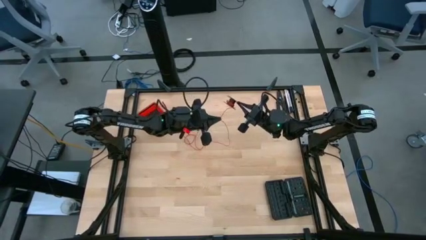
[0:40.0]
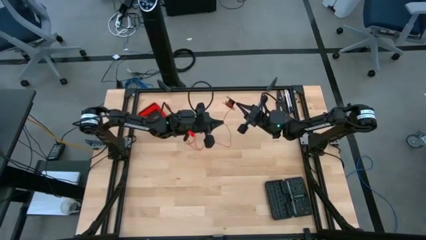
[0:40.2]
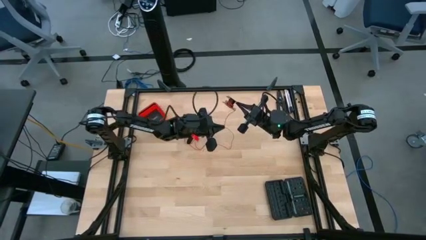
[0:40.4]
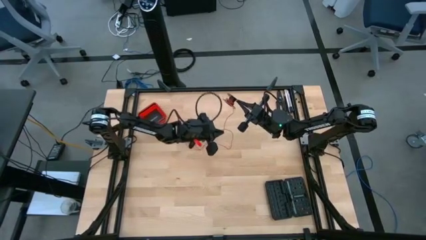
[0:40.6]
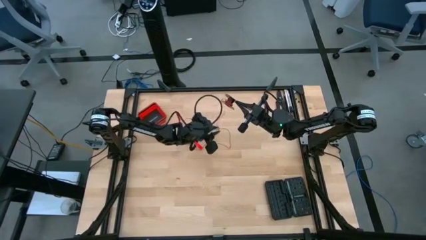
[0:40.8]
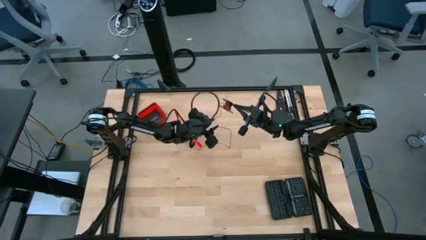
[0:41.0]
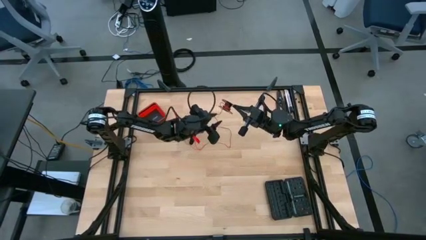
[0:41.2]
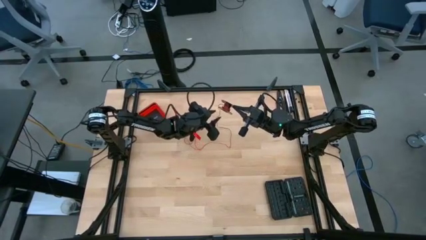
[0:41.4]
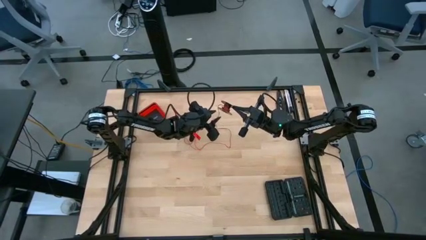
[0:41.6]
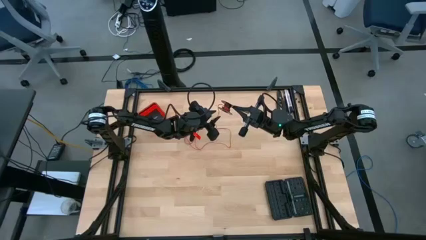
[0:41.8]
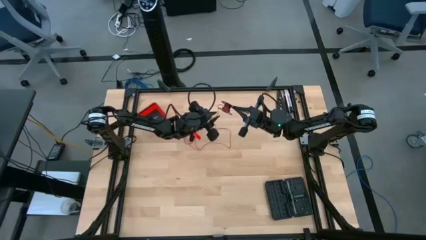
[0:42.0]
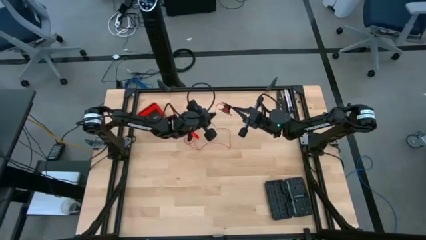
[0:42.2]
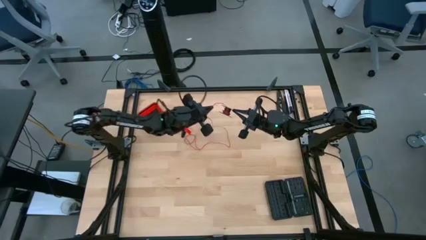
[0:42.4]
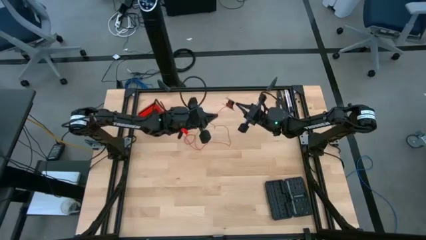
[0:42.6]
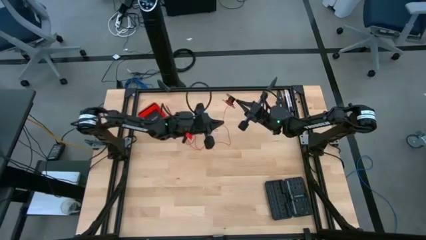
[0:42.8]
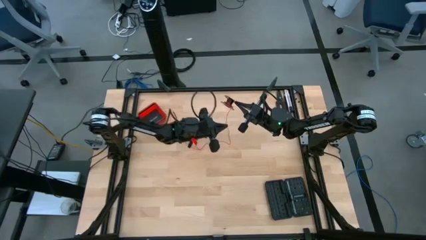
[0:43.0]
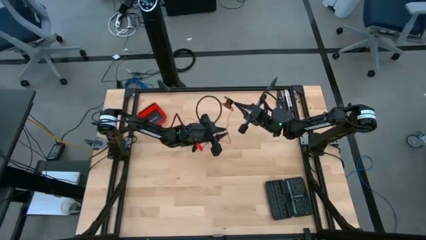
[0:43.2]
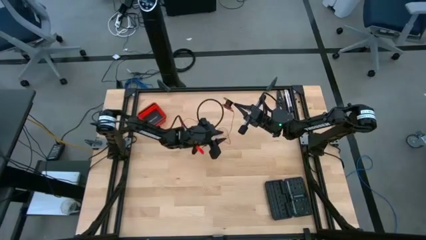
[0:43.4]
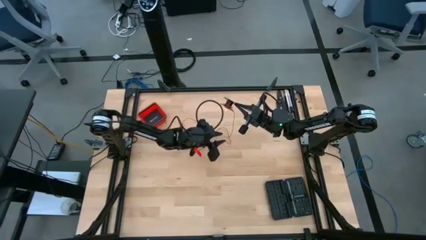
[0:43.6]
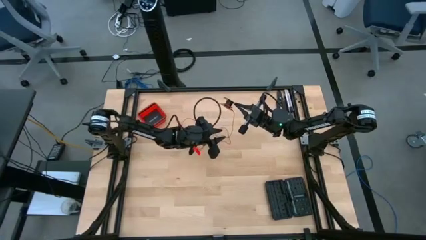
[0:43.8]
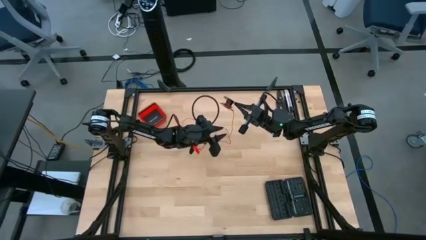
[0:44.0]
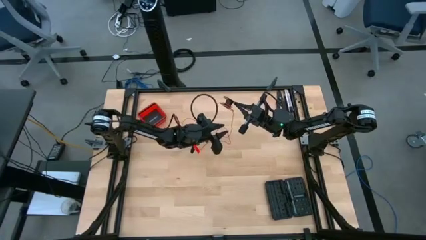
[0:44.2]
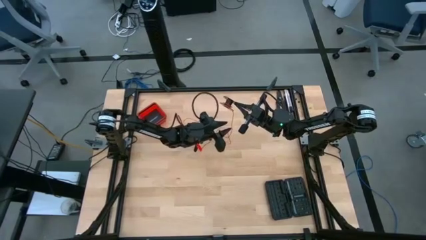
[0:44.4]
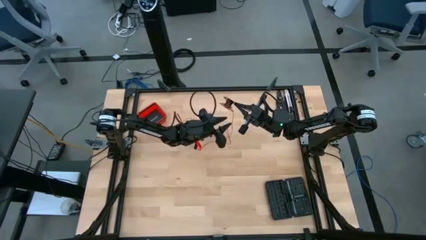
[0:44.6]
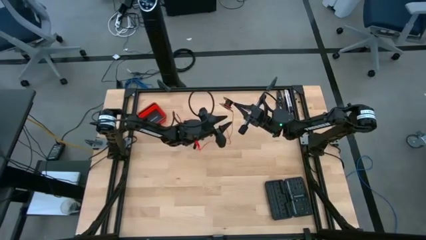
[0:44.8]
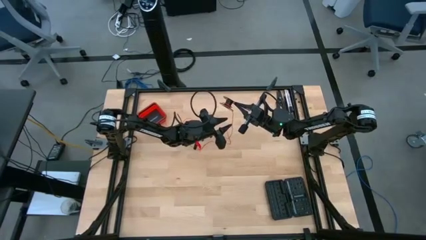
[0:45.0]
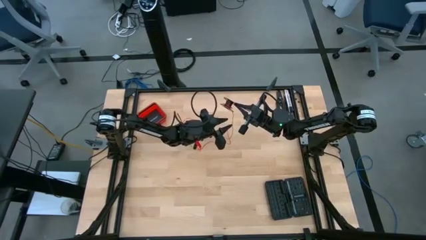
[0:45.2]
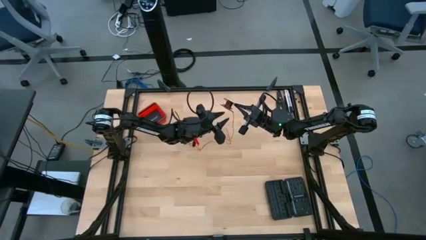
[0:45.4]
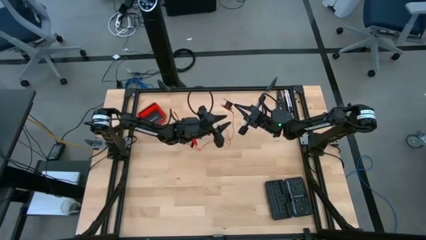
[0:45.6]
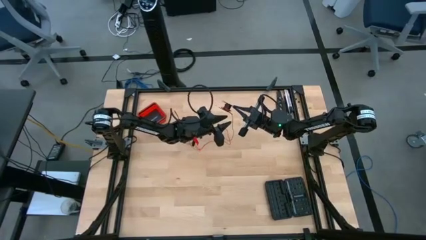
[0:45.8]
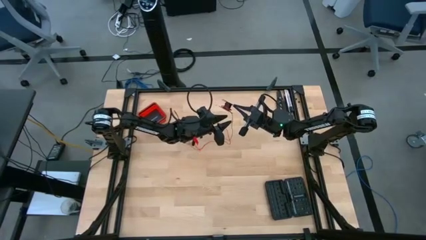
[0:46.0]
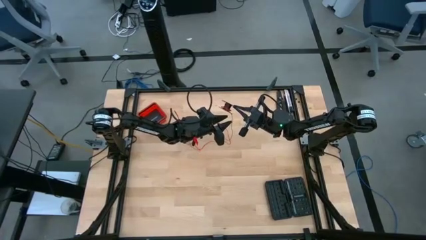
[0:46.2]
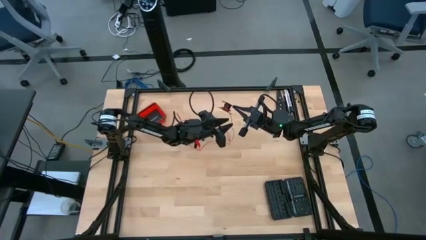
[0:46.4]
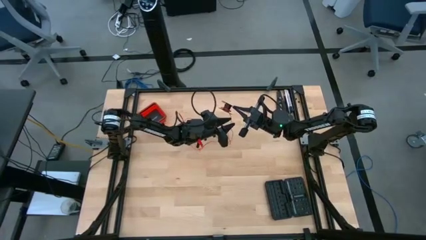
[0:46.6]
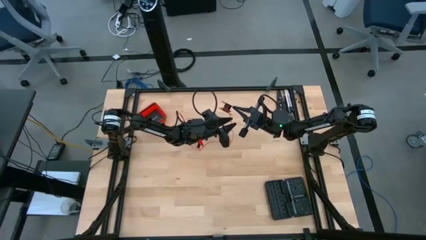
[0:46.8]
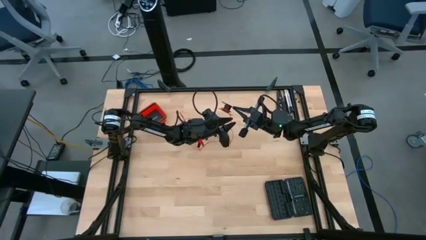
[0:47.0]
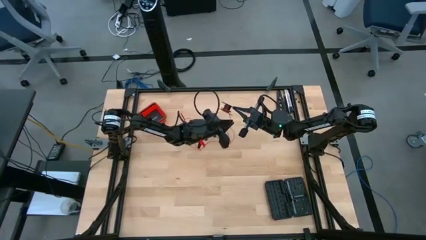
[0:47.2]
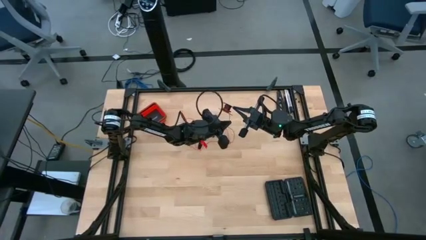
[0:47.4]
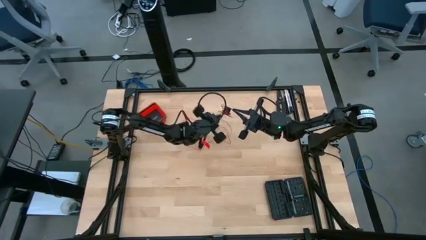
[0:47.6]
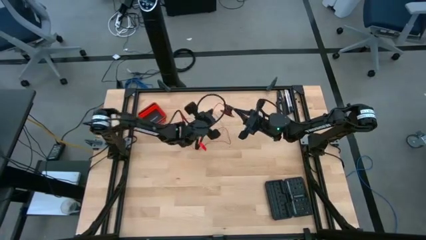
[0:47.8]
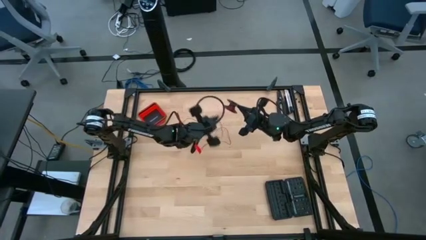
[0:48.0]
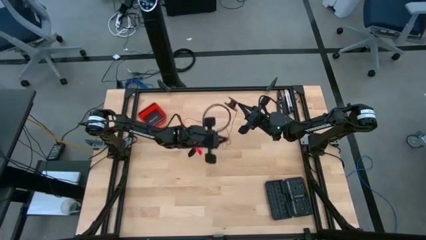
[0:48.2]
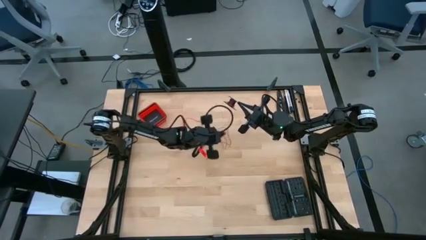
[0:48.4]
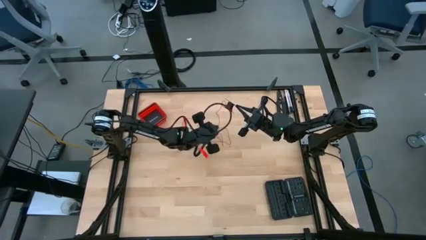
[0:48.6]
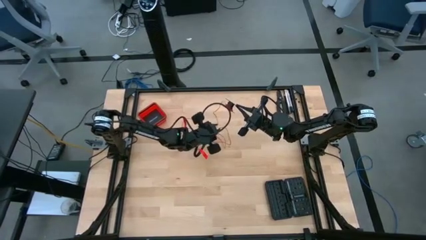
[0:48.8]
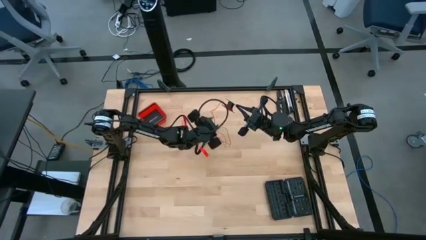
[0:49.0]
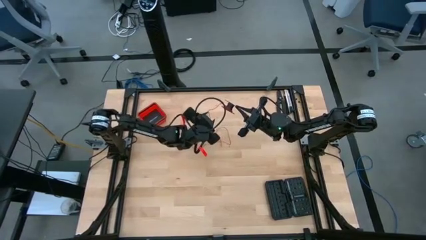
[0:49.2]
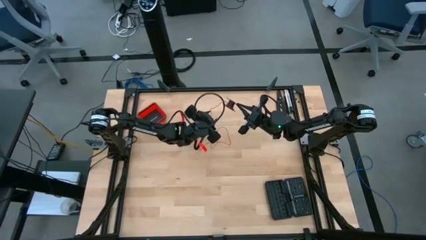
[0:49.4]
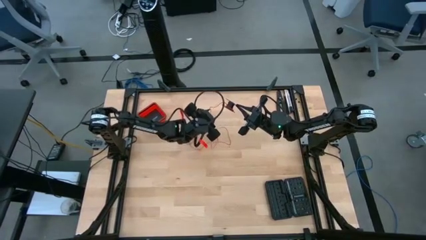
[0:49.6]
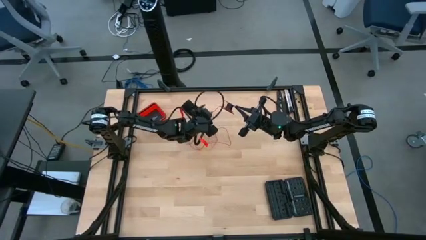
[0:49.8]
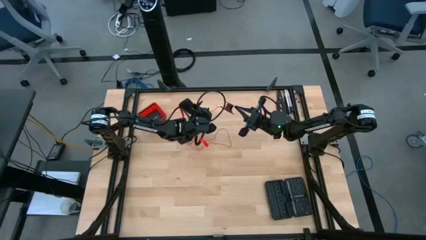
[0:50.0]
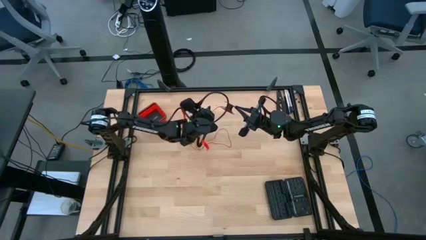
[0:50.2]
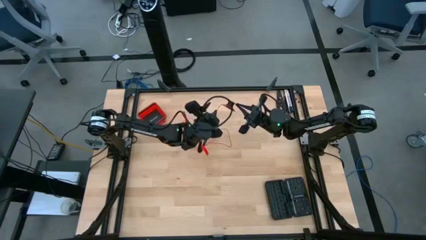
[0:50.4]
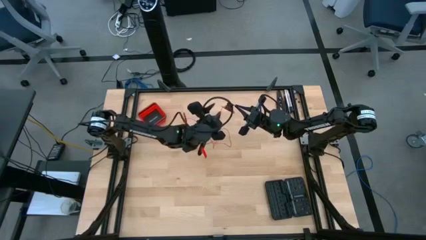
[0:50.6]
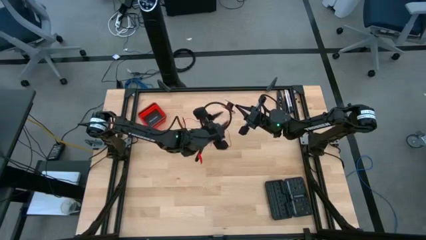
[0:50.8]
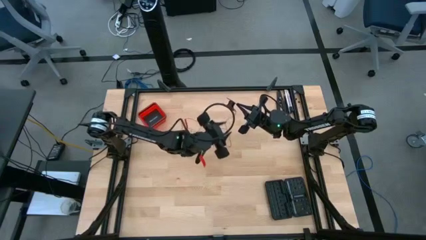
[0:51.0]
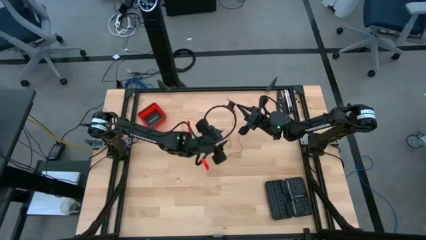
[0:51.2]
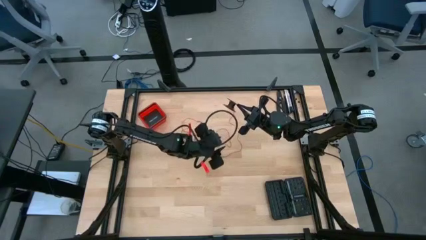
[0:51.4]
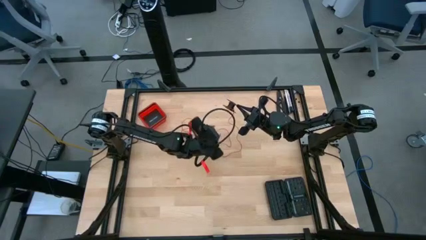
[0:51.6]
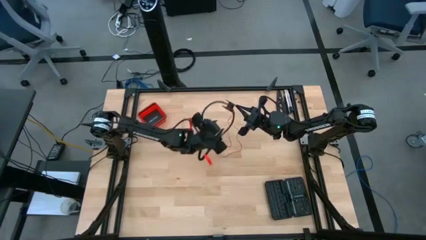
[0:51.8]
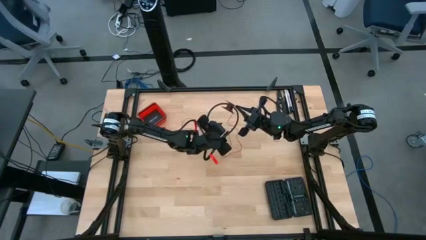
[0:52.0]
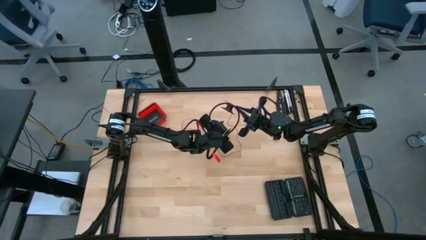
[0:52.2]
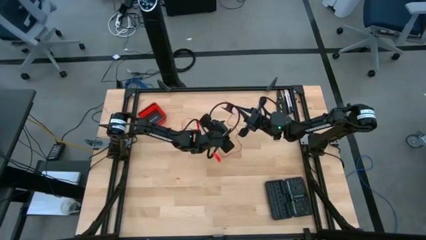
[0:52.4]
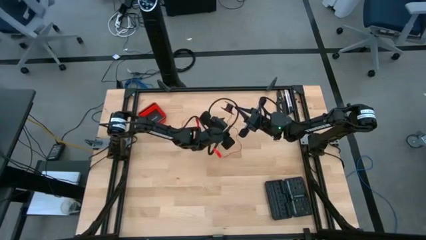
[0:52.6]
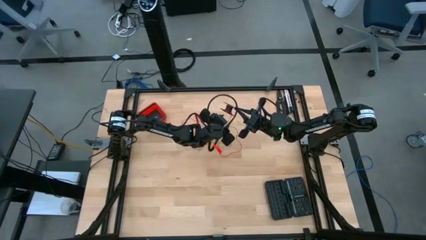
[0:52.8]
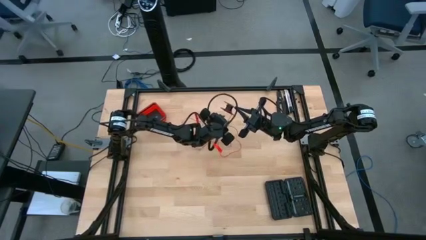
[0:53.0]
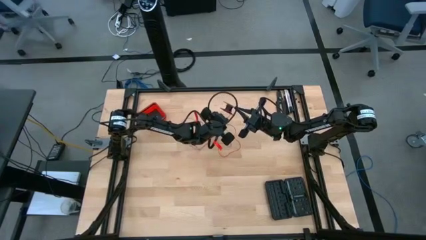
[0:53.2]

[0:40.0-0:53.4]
Task: Coil cords
Uncoil the wire to the spool
